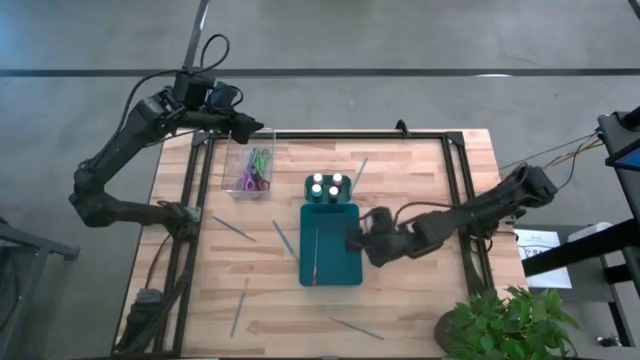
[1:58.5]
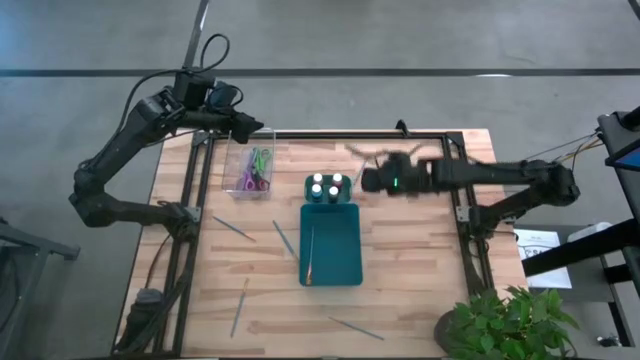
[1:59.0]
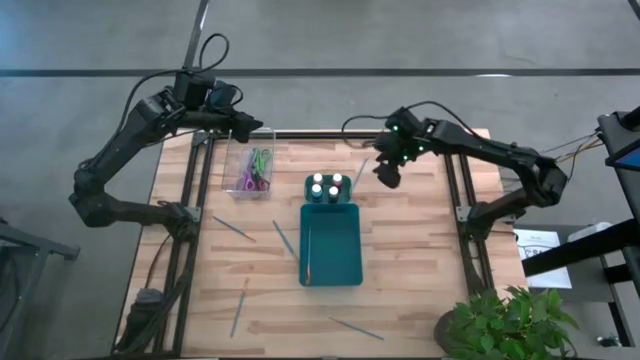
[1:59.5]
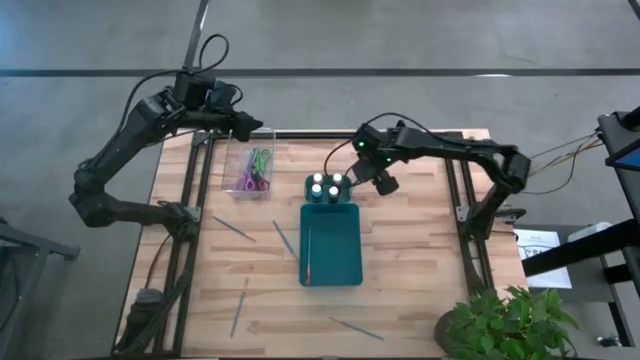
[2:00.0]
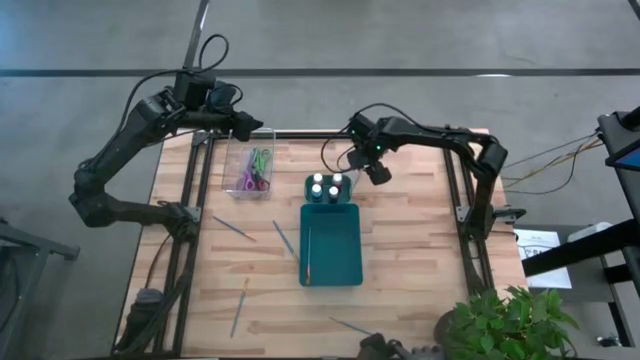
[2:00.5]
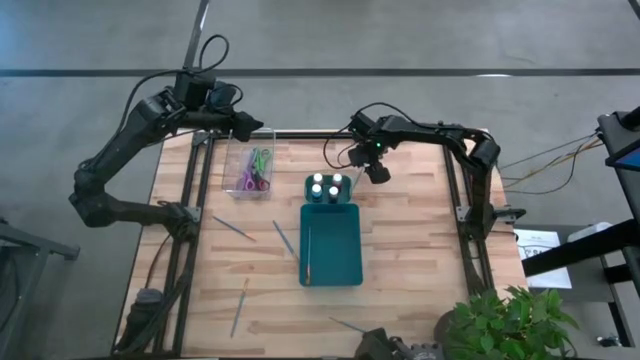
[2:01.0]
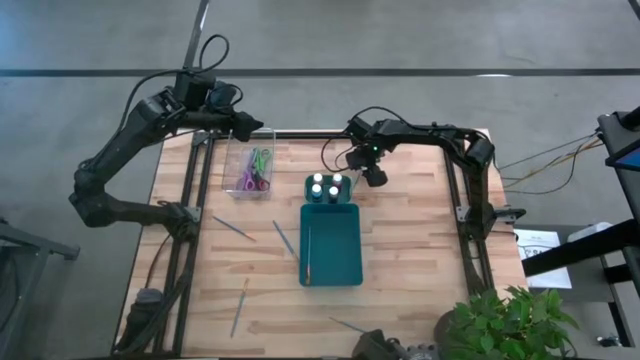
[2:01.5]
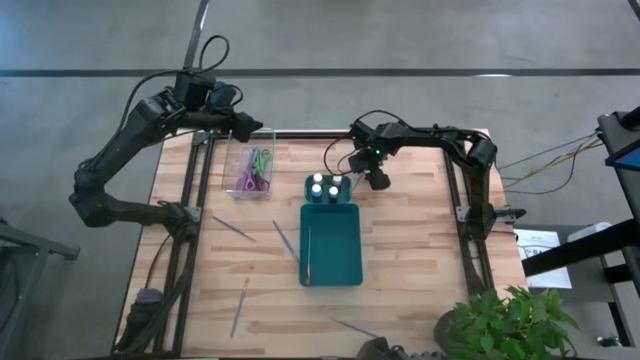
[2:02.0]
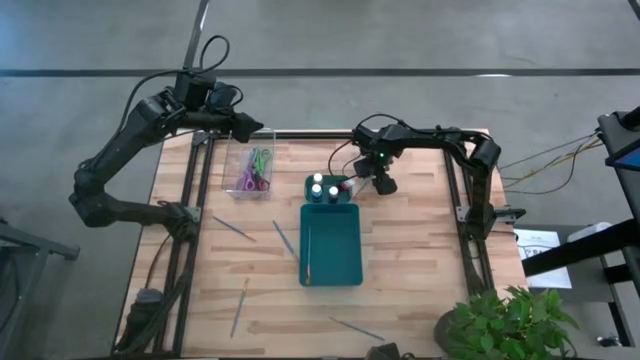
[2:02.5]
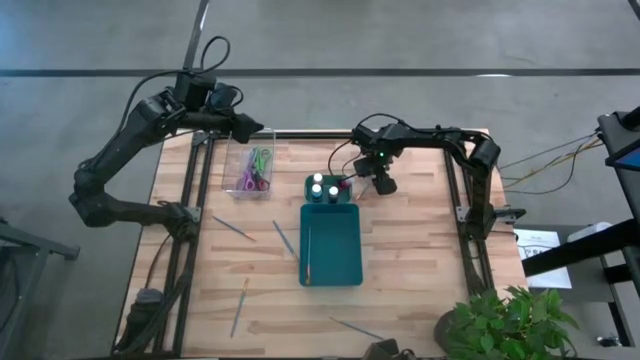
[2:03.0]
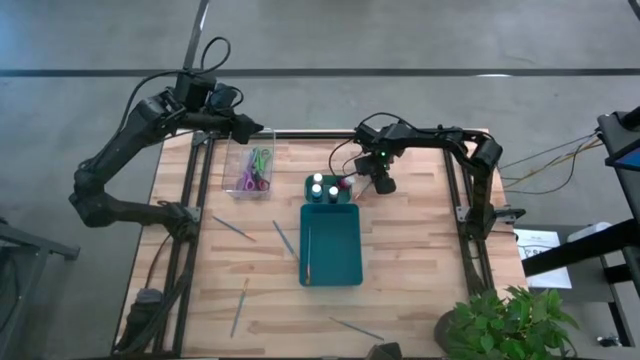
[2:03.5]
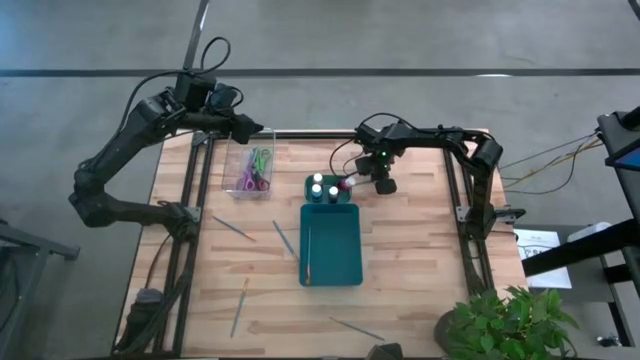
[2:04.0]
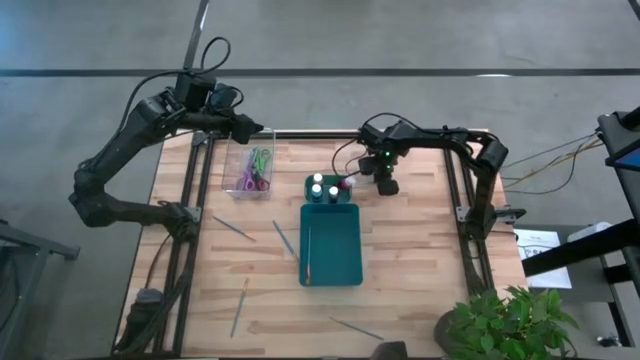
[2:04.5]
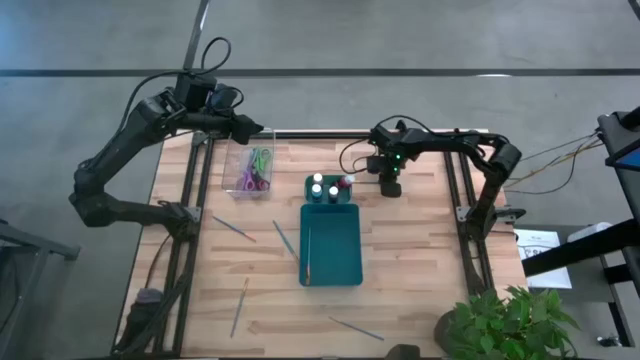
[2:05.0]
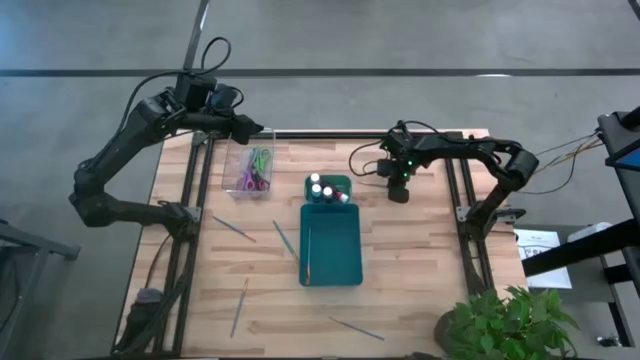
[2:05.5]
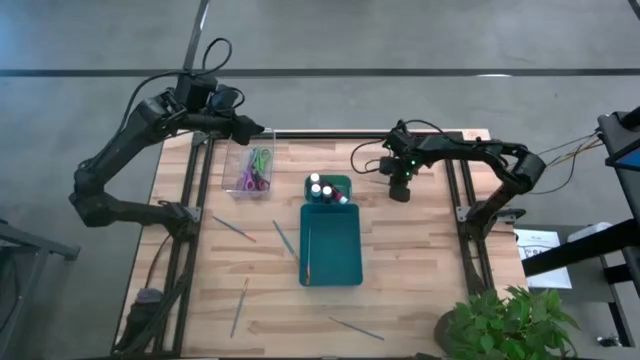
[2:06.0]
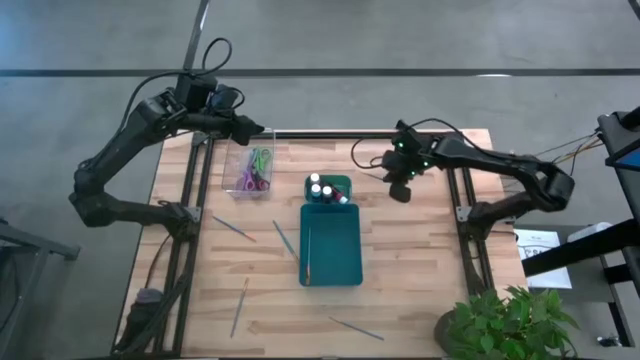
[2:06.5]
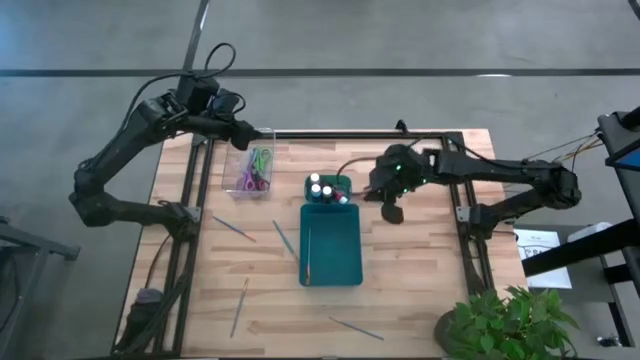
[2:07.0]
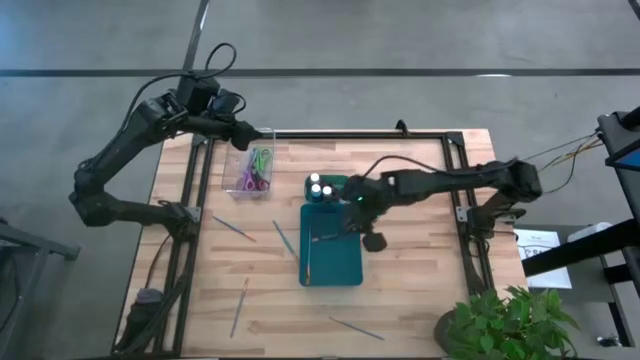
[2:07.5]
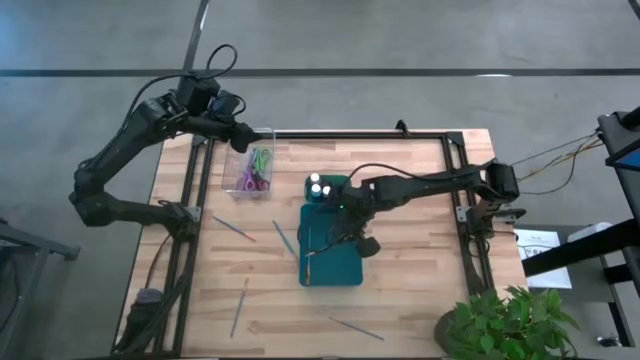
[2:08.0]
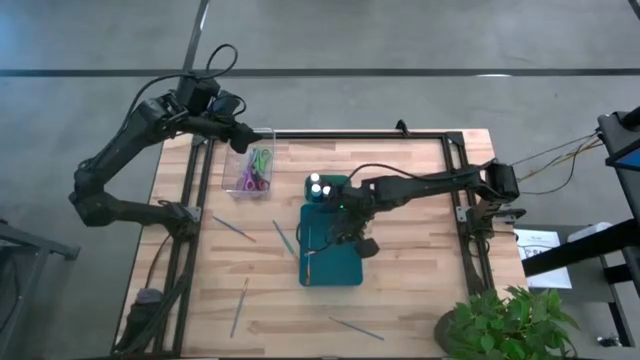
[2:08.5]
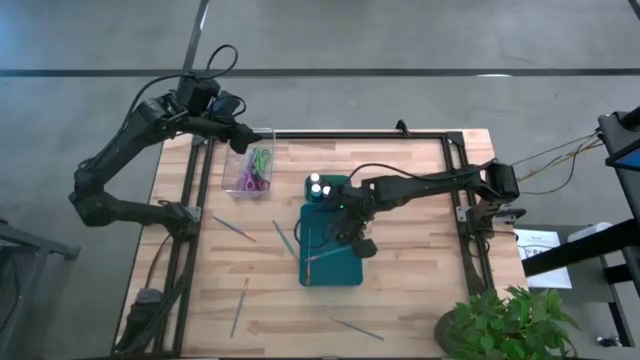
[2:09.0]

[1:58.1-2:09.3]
Task: Pick & Place Paint Supplies
Put the blue paintbrush into the blue bin

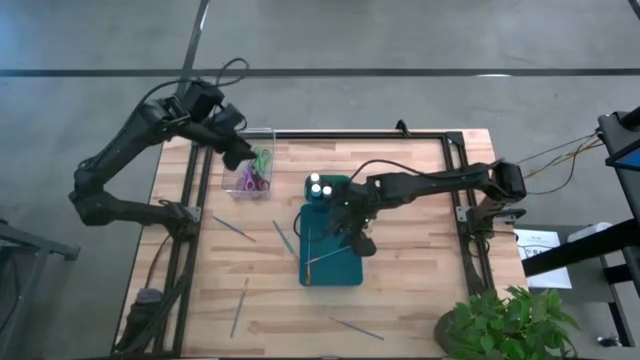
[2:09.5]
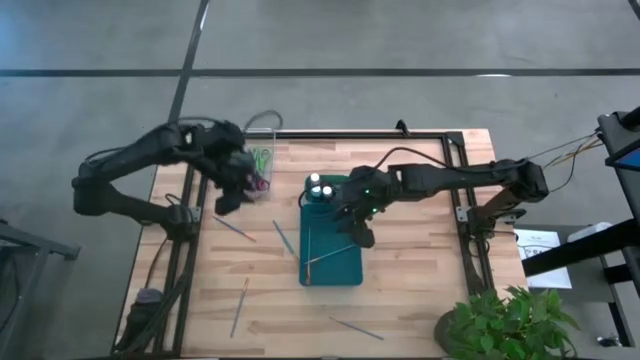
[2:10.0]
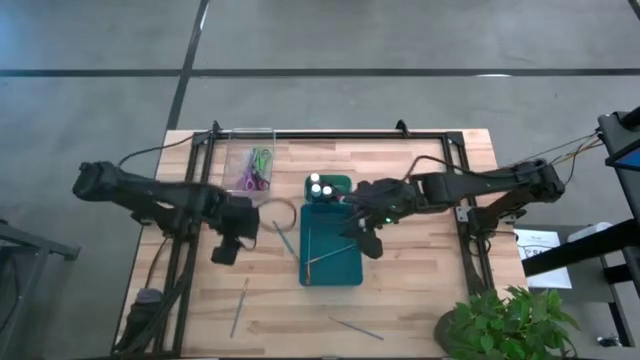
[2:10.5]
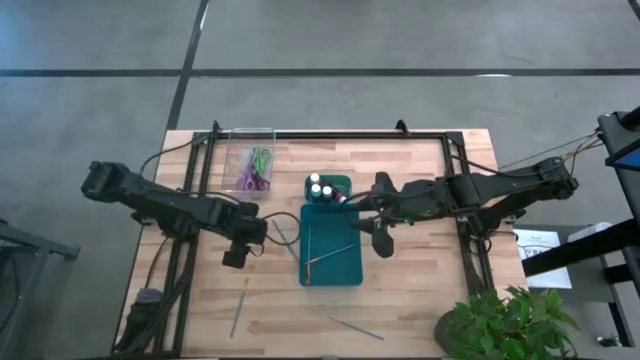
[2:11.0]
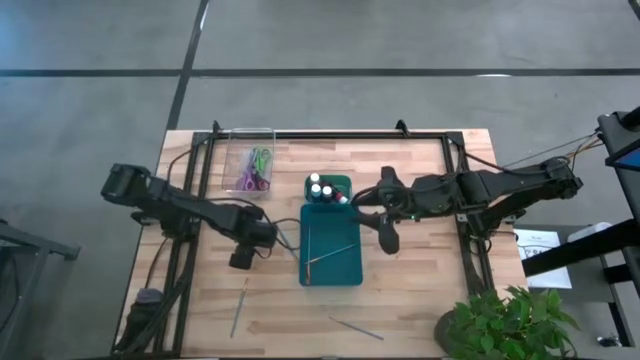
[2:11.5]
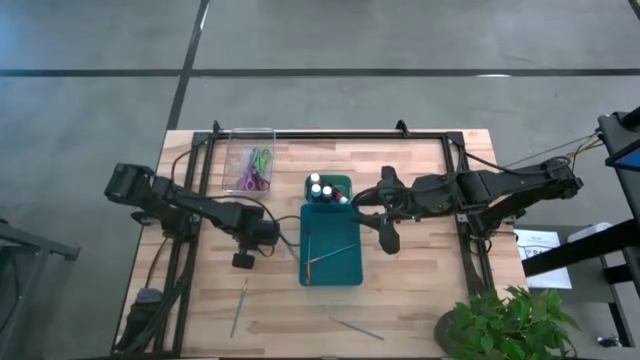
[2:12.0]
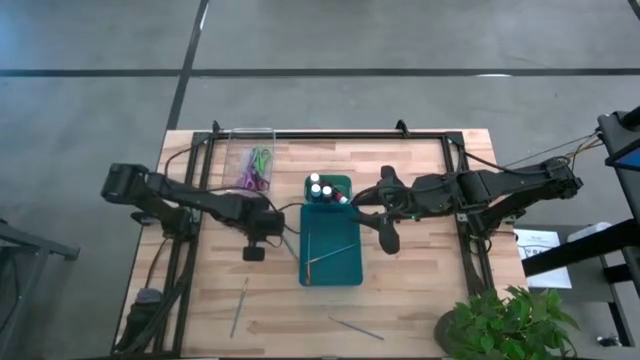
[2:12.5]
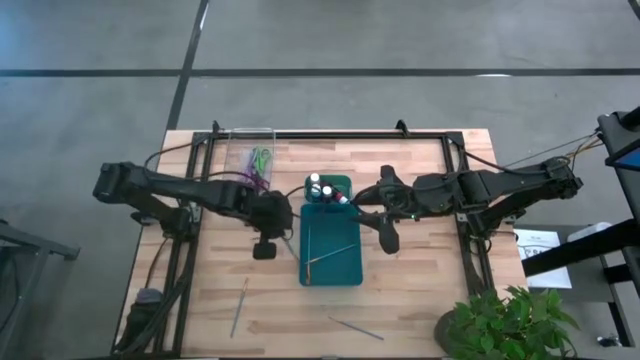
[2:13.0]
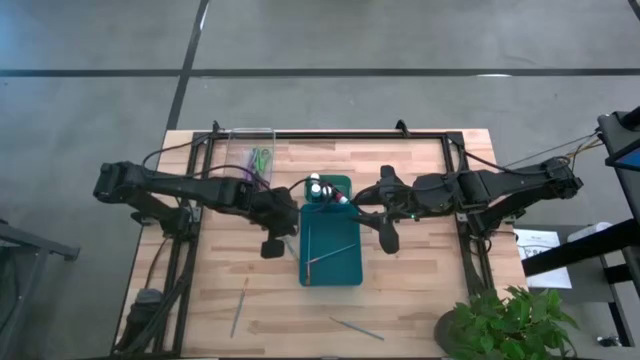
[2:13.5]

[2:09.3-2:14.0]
Put the blue paintbrush into the blue bin

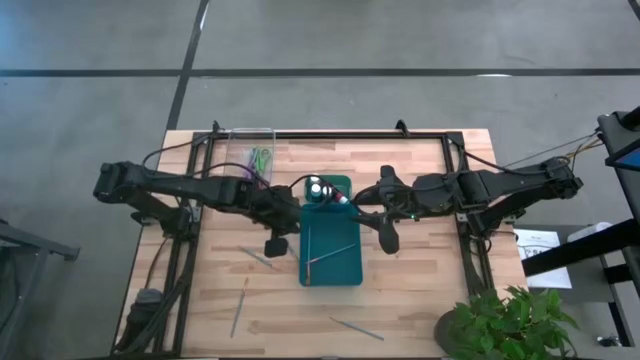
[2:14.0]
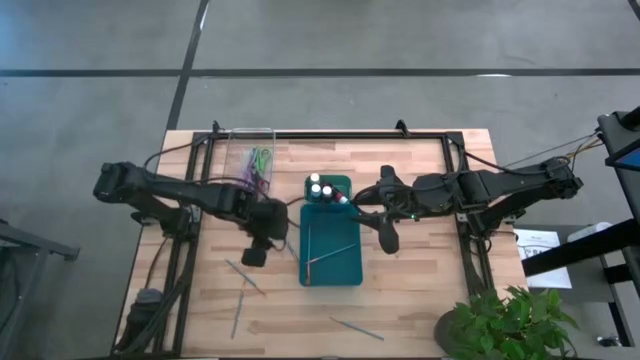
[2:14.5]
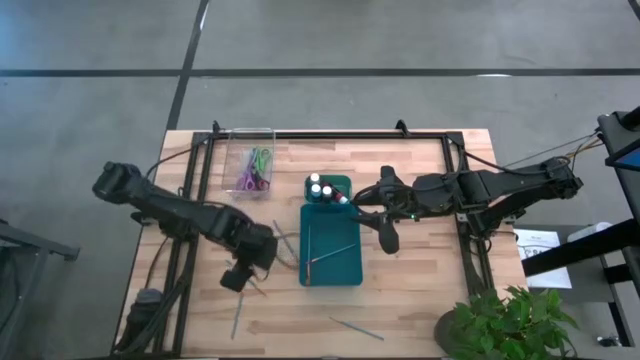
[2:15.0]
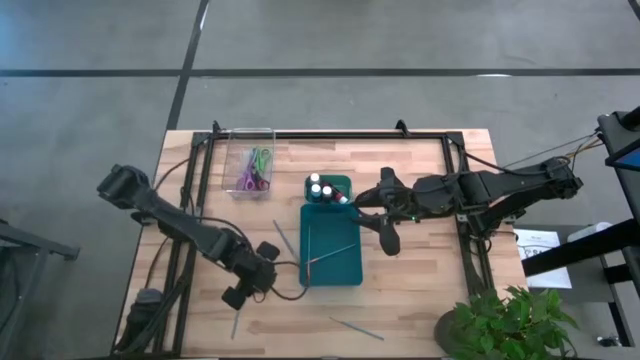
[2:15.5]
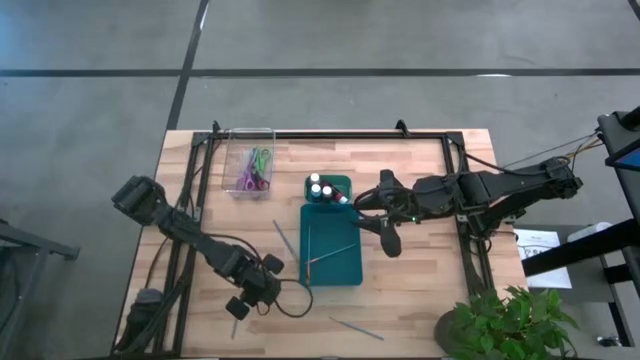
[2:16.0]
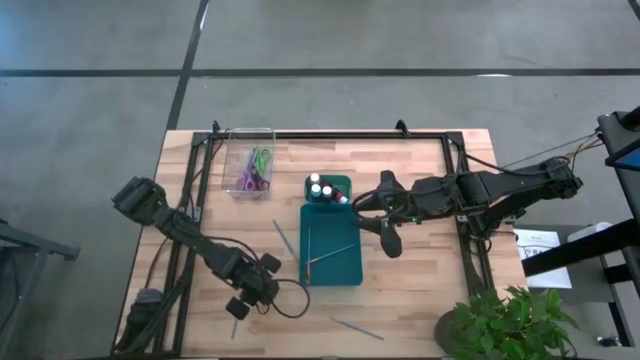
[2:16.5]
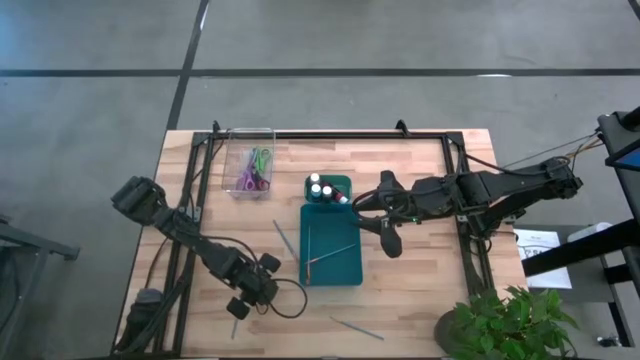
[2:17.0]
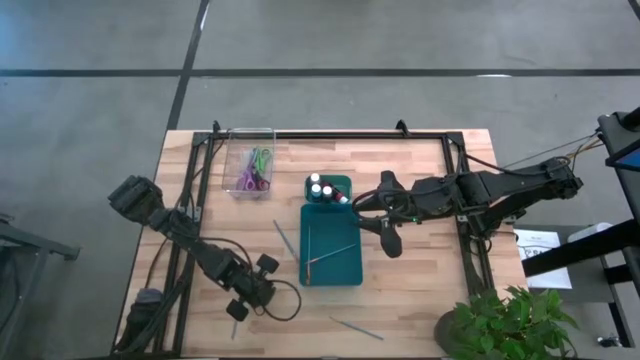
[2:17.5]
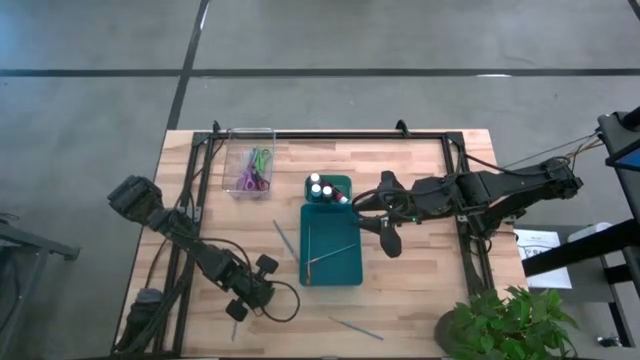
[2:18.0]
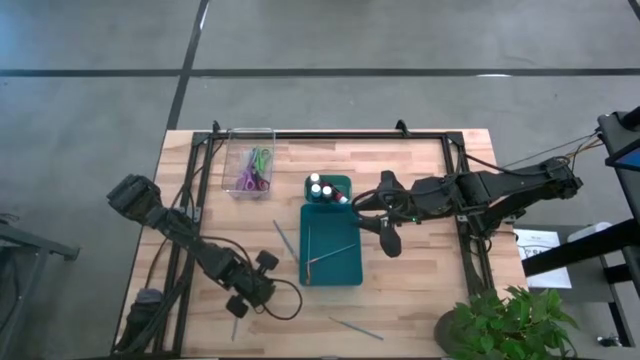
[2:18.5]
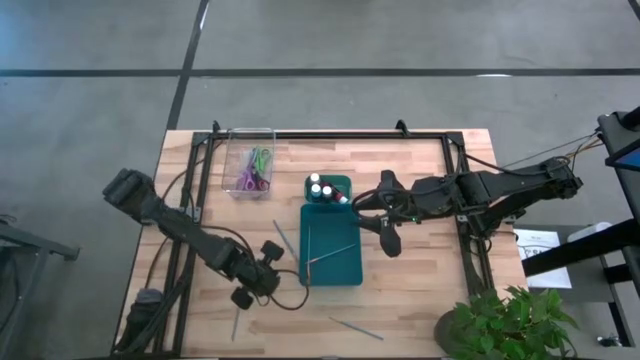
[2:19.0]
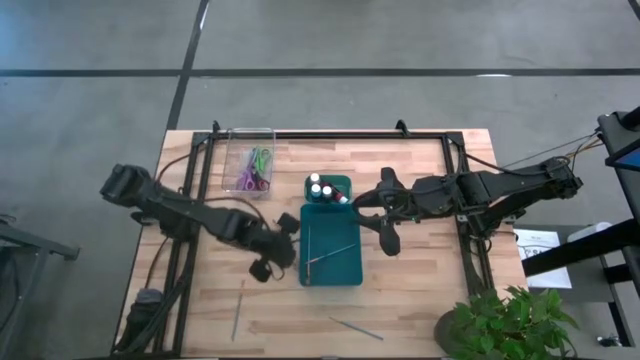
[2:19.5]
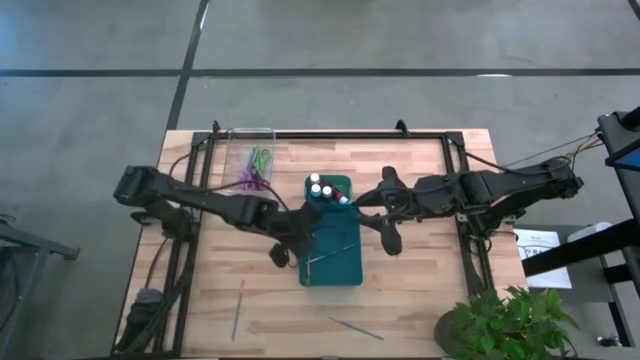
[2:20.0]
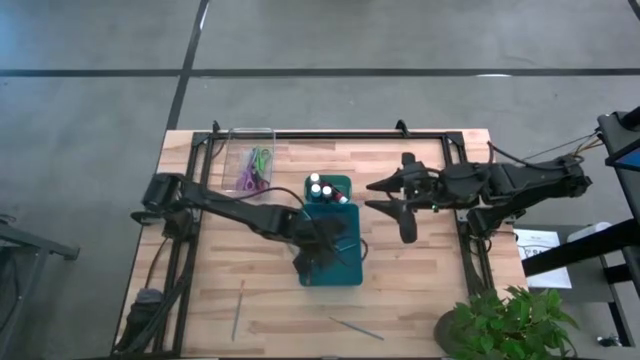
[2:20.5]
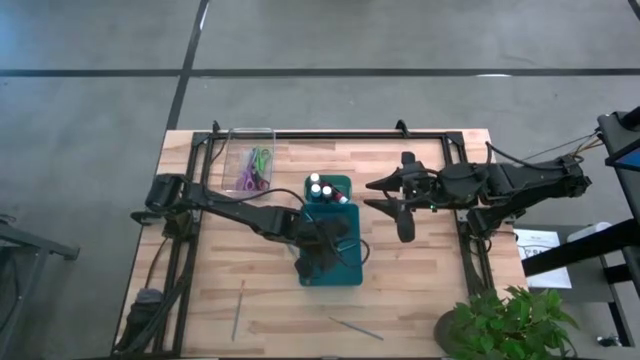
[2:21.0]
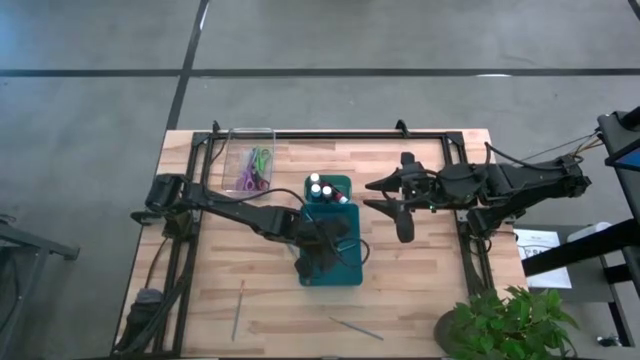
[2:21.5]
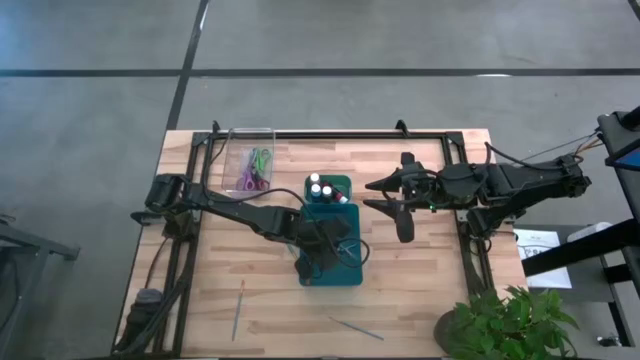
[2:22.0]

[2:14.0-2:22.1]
Put the blue paintbrush into the blue bin
